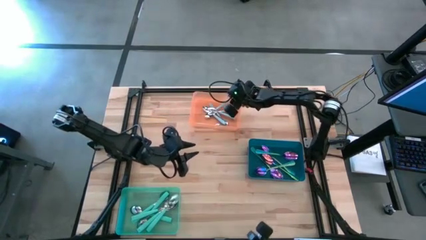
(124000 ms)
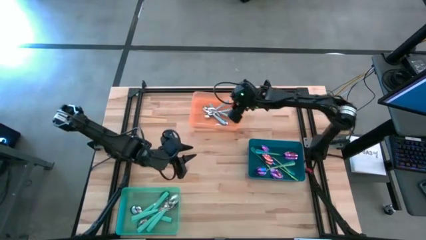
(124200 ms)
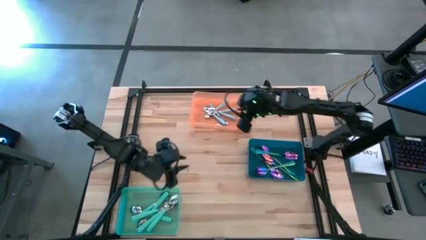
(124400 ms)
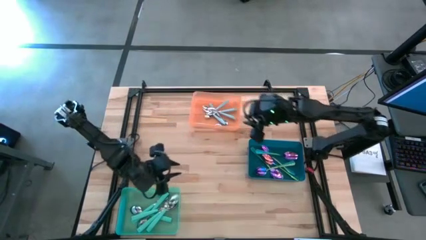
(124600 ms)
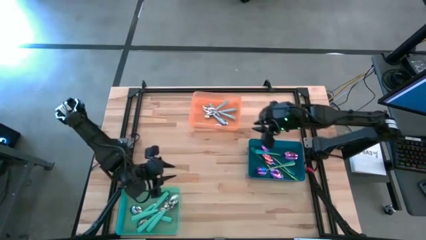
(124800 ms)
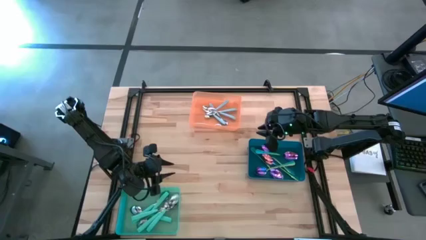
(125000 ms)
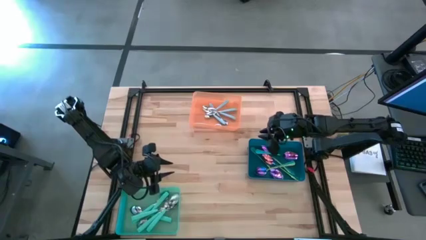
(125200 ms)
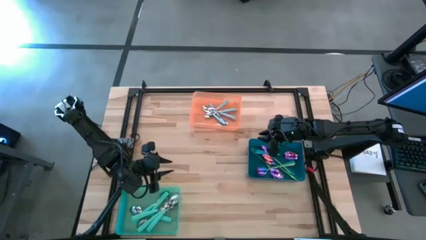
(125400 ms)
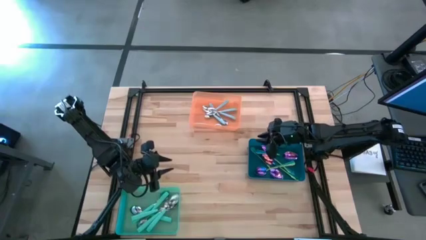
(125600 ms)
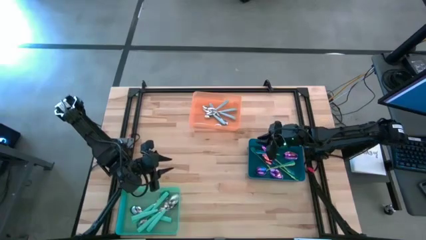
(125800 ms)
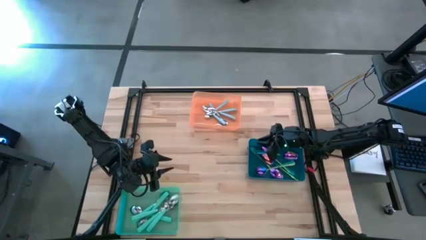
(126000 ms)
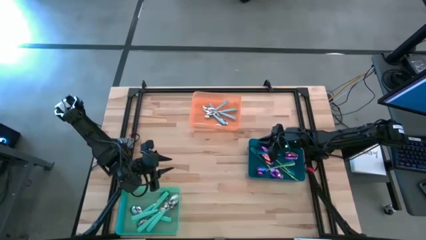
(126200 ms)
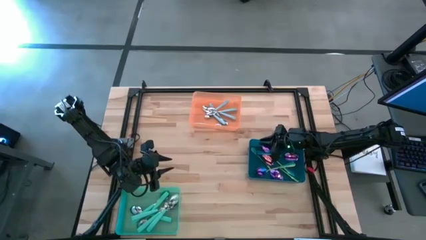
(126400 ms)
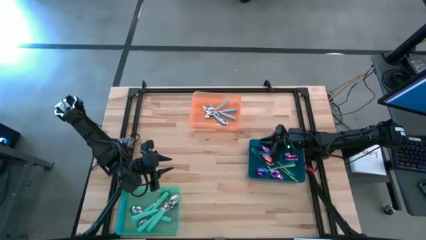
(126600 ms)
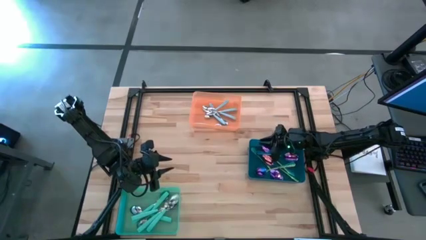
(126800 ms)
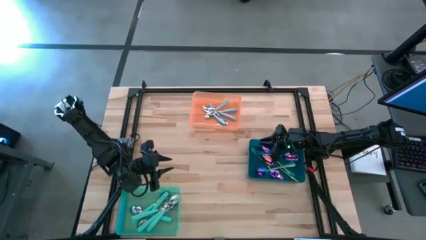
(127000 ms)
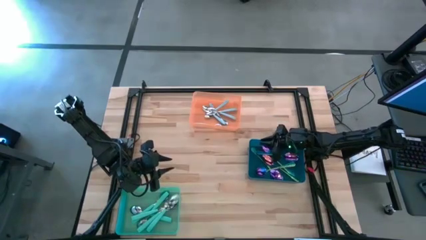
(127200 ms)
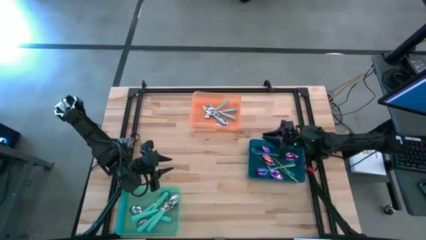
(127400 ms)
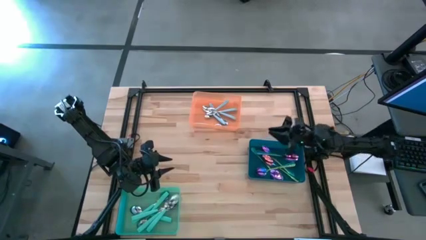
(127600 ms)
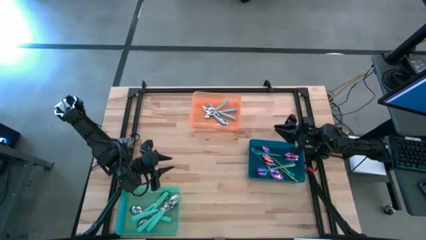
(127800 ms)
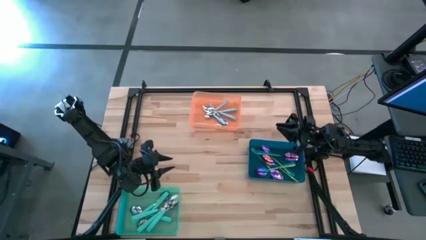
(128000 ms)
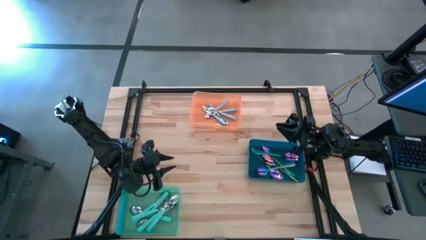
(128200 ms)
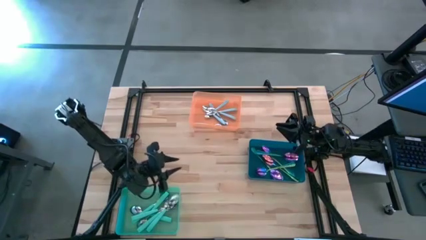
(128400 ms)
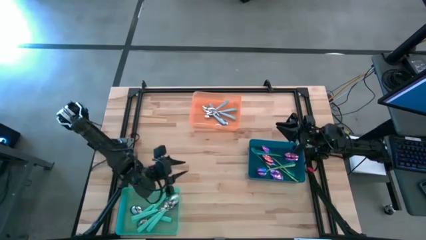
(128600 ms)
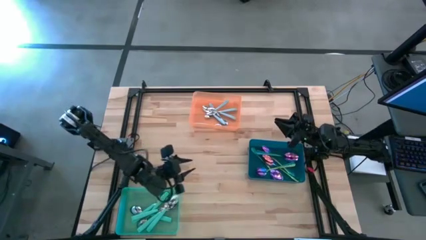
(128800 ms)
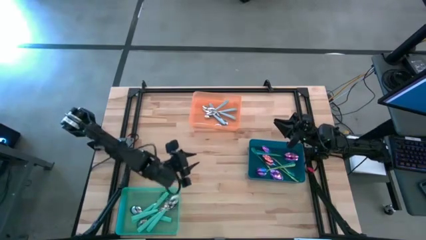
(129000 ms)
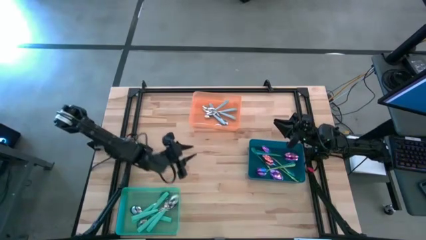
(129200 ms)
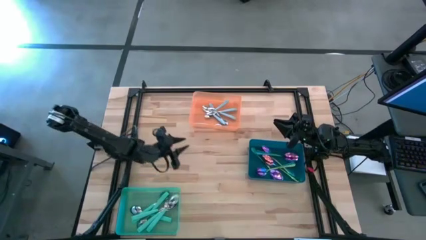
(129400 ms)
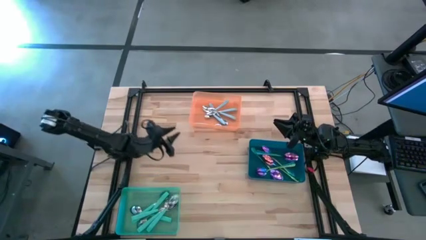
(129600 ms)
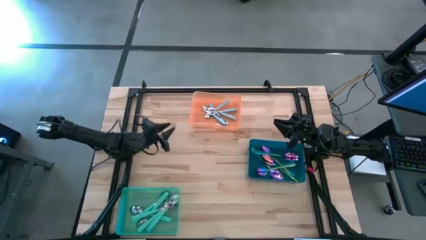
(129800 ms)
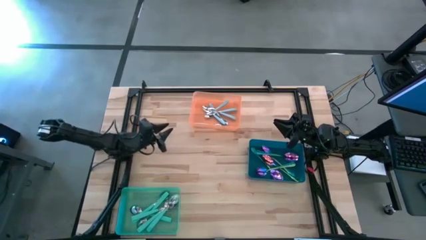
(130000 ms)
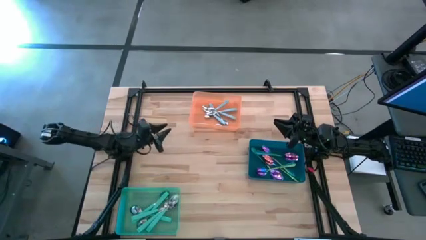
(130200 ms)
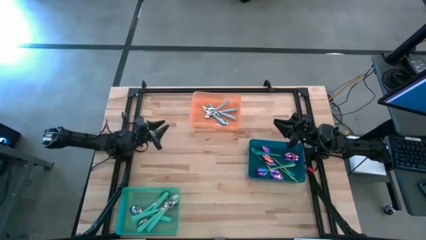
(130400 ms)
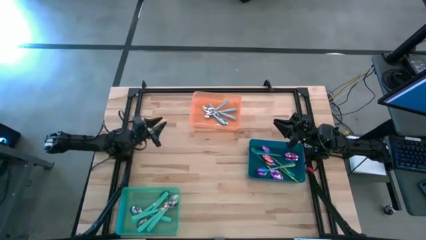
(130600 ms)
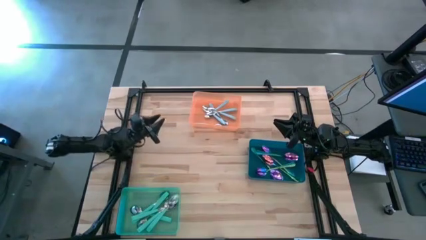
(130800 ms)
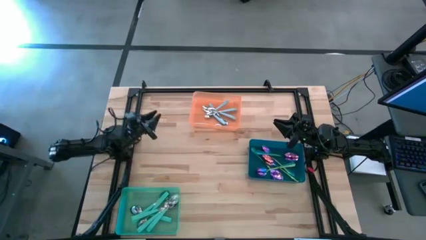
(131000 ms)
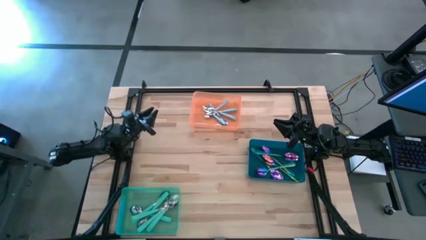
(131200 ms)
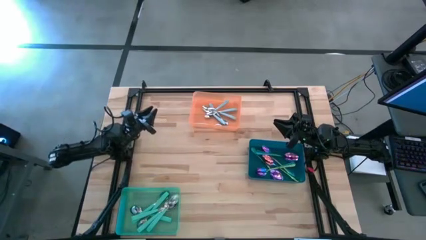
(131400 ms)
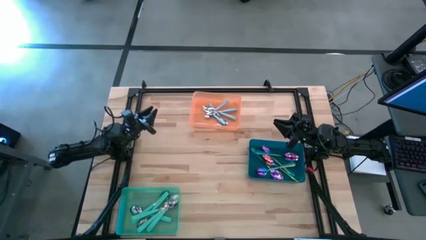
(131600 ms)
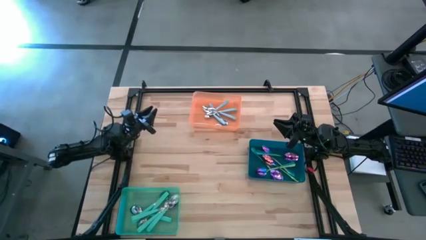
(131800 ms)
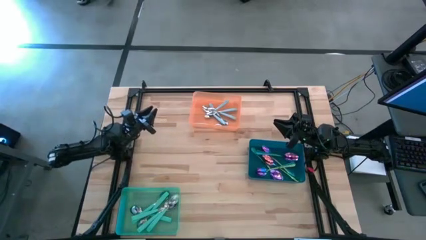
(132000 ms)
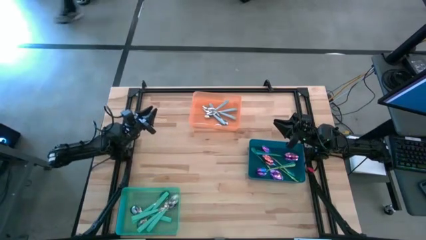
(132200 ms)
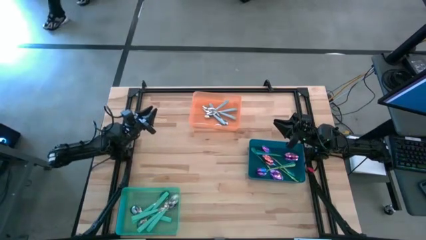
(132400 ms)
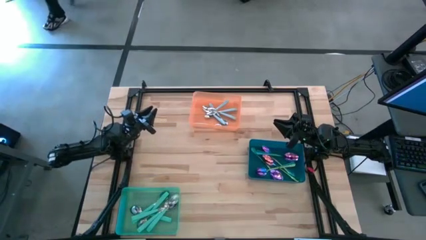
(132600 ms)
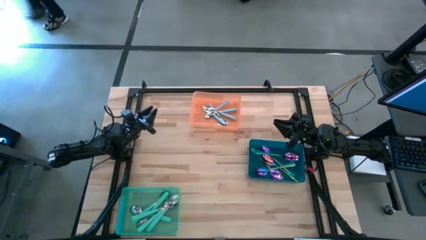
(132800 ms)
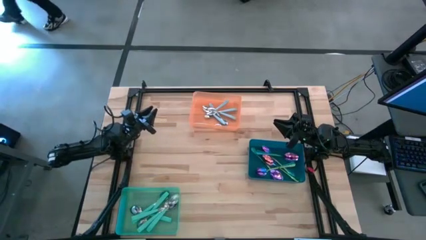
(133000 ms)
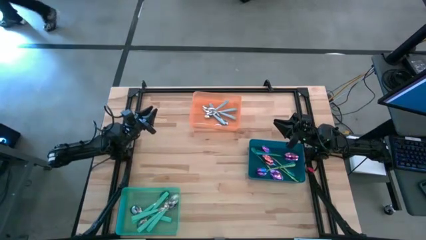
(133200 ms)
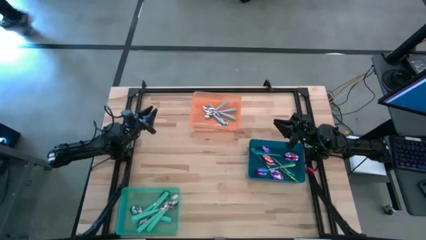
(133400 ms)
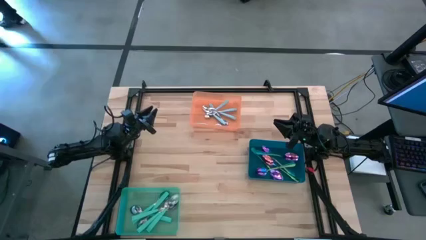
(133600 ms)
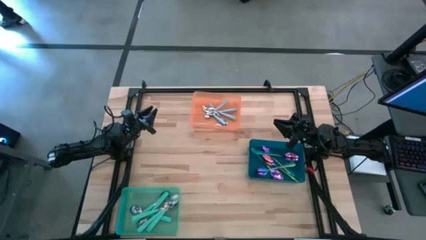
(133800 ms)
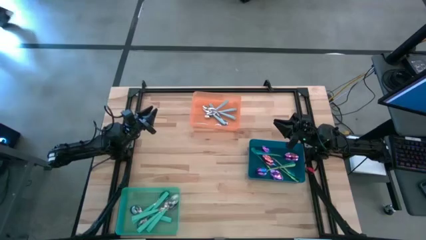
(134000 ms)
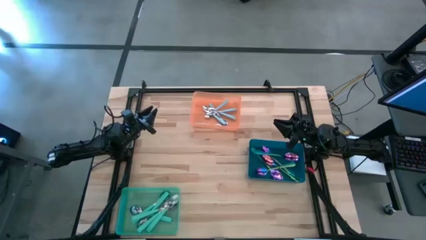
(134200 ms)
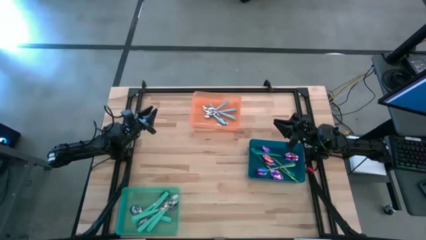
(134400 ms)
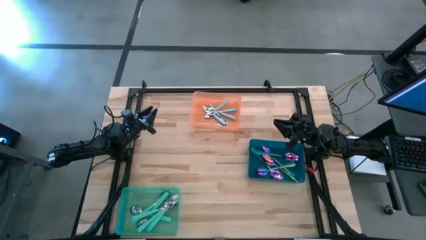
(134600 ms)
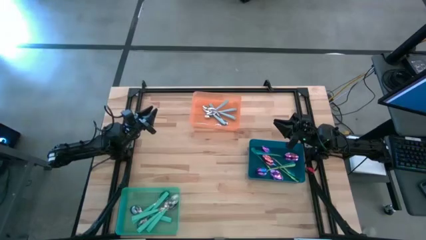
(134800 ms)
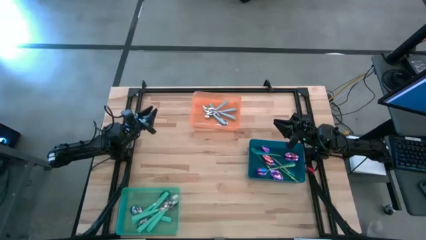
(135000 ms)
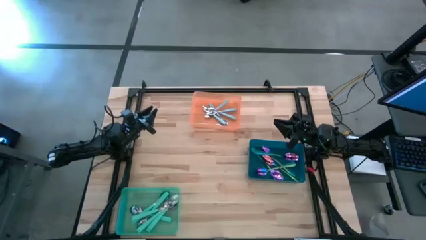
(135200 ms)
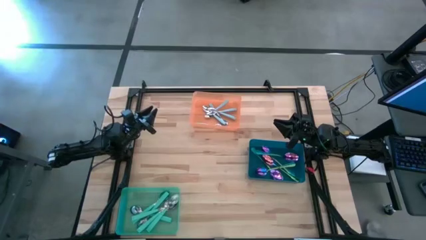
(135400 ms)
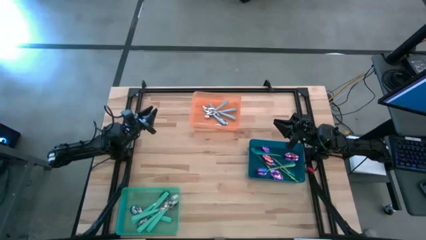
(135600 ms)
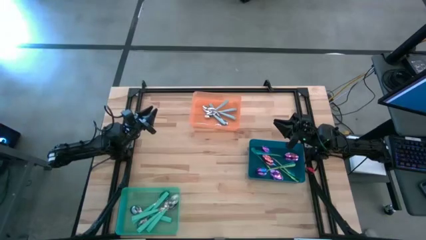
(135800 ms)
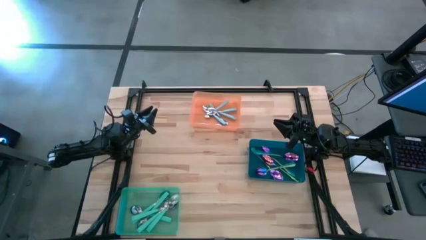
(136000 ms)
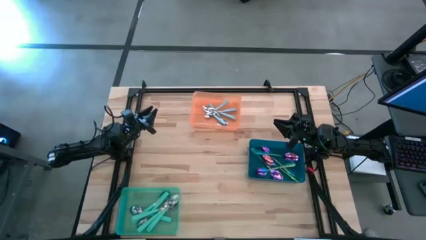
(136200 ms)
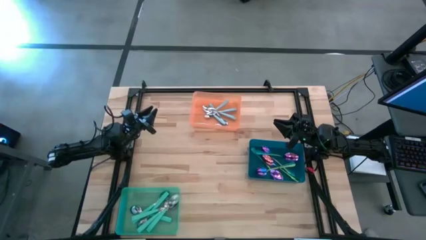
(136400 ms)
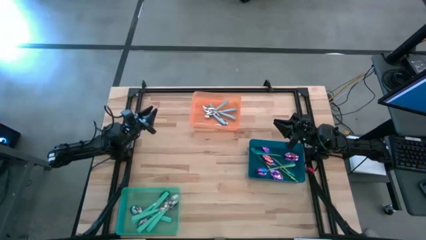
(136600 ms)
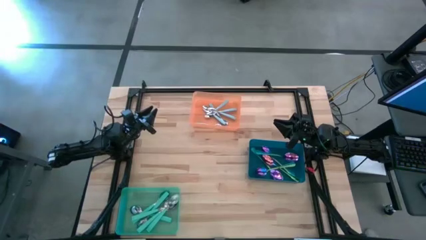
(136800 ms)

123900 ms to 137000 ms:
Task: Sort silverware by color (type)
Return to Home Position
